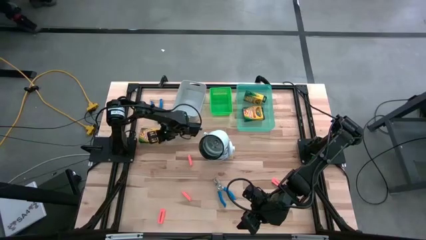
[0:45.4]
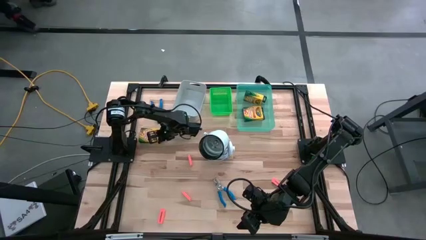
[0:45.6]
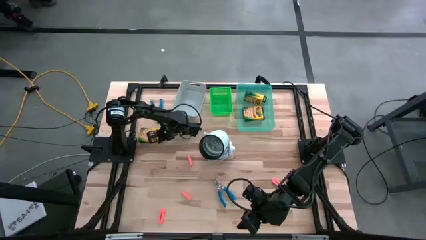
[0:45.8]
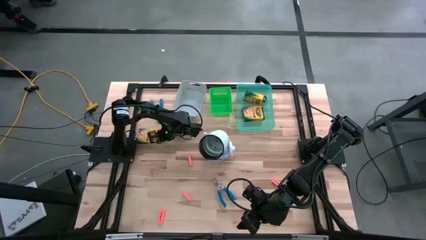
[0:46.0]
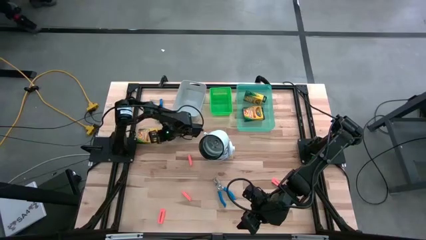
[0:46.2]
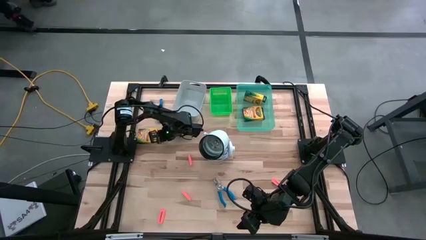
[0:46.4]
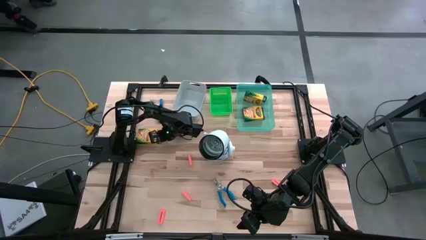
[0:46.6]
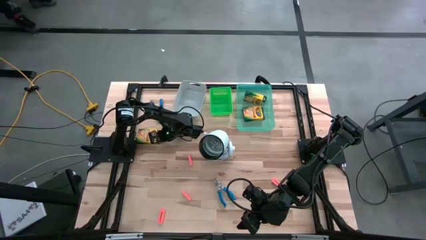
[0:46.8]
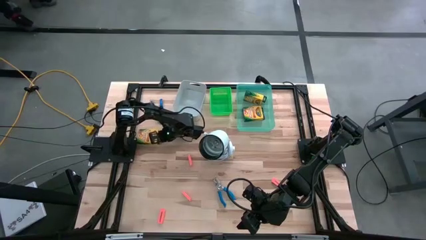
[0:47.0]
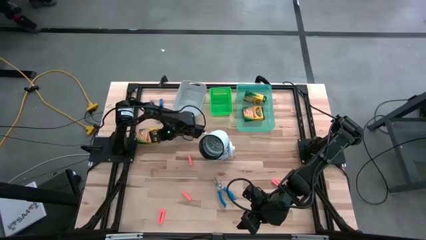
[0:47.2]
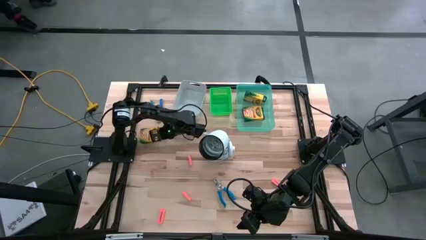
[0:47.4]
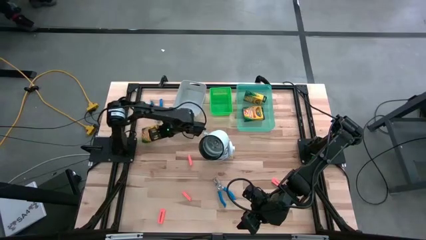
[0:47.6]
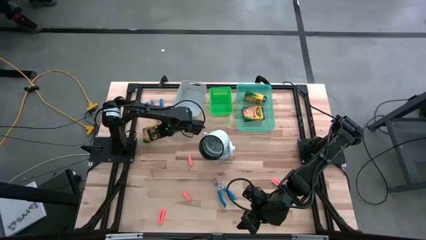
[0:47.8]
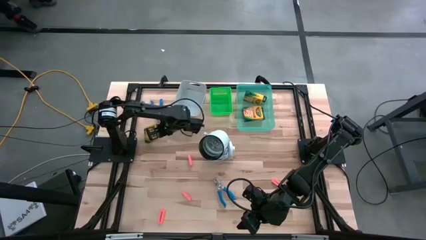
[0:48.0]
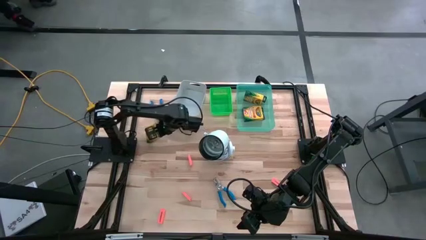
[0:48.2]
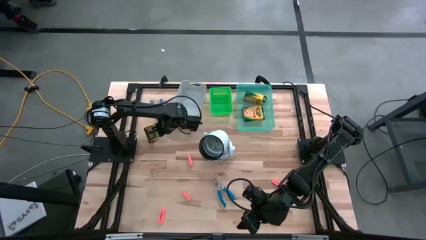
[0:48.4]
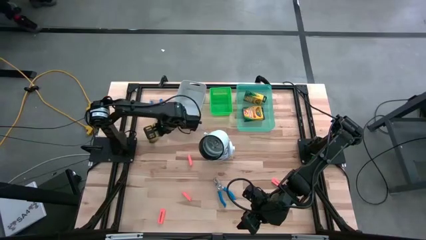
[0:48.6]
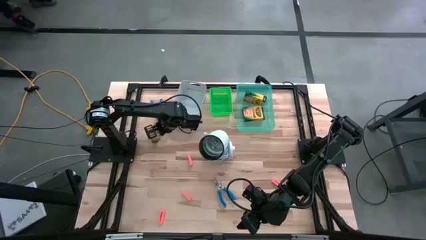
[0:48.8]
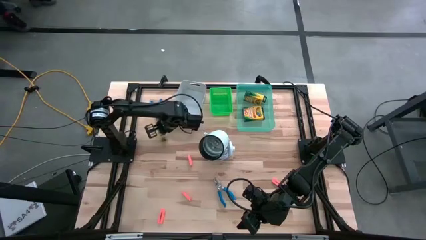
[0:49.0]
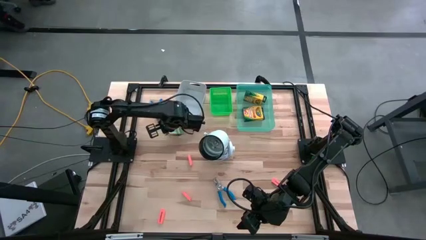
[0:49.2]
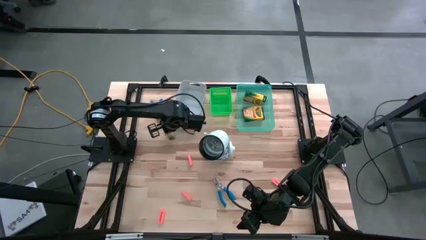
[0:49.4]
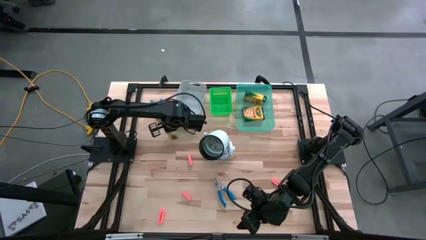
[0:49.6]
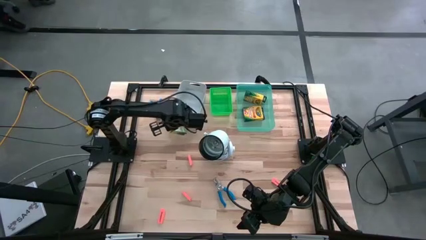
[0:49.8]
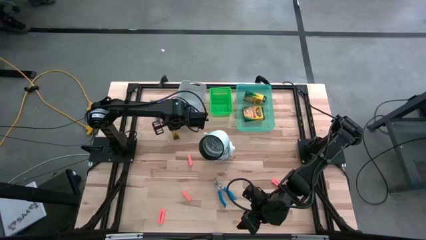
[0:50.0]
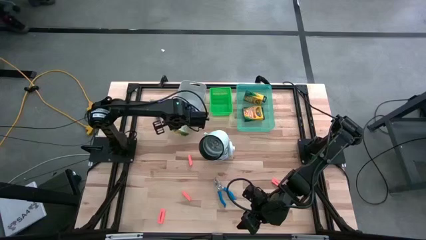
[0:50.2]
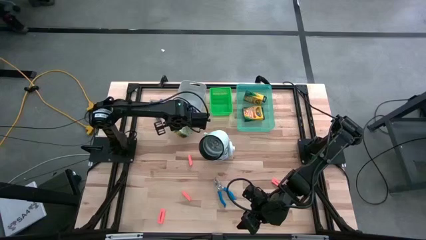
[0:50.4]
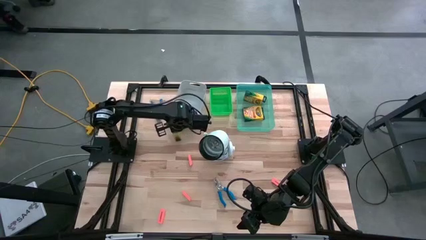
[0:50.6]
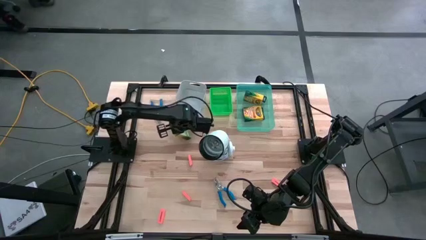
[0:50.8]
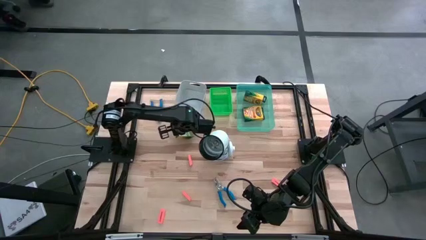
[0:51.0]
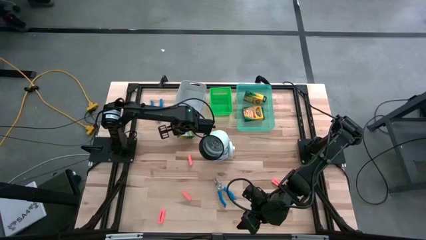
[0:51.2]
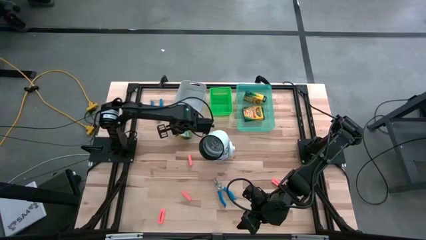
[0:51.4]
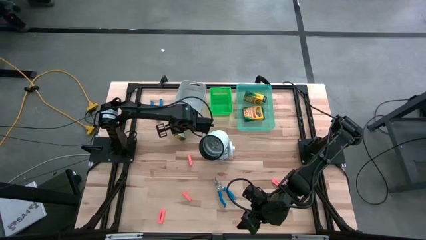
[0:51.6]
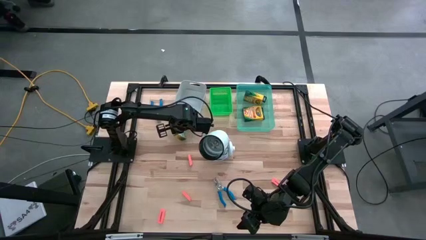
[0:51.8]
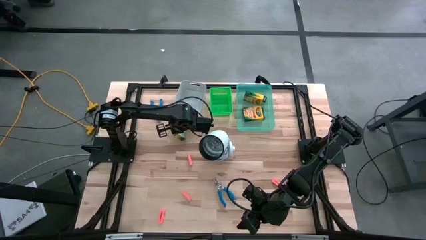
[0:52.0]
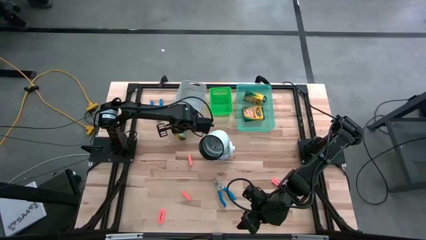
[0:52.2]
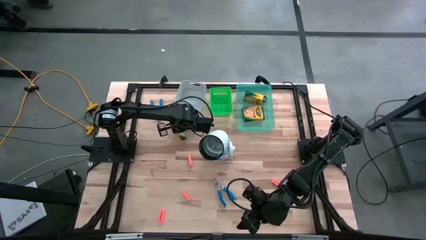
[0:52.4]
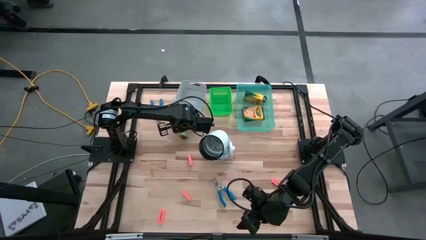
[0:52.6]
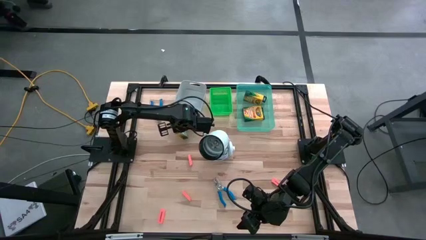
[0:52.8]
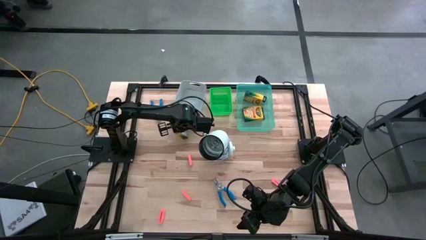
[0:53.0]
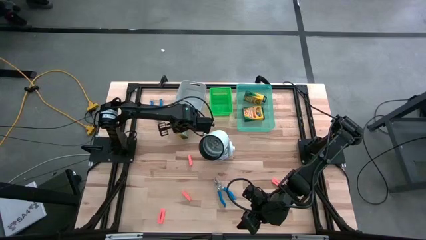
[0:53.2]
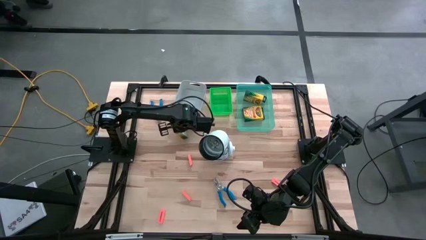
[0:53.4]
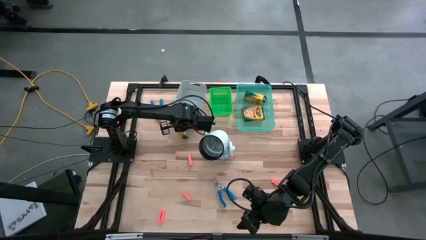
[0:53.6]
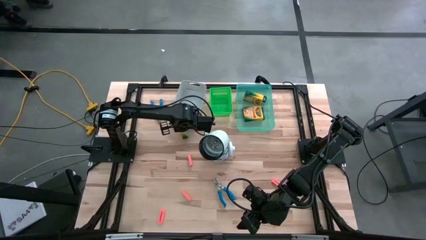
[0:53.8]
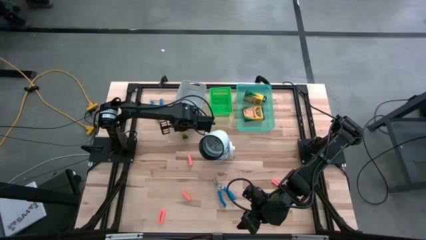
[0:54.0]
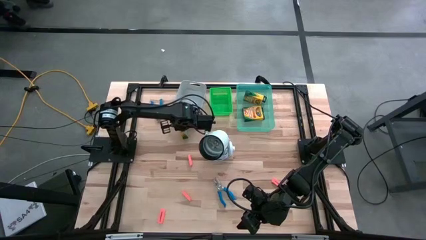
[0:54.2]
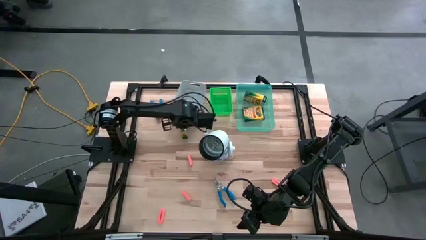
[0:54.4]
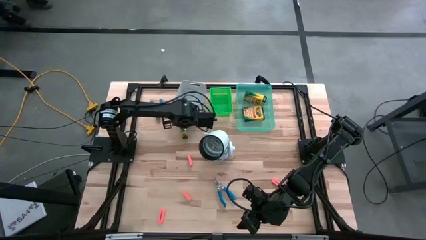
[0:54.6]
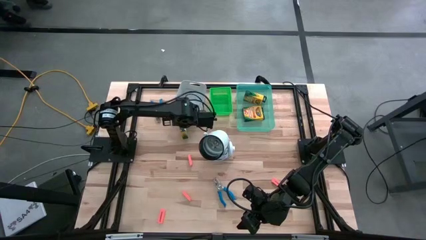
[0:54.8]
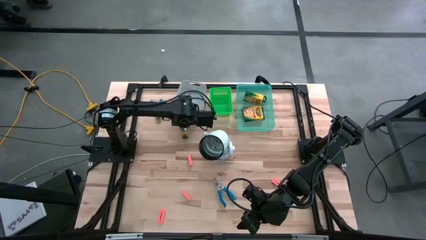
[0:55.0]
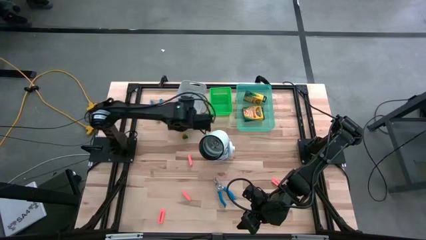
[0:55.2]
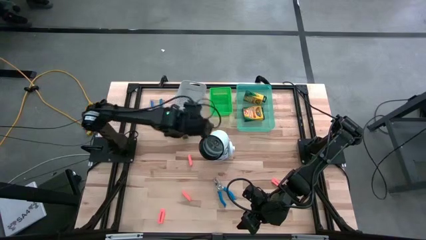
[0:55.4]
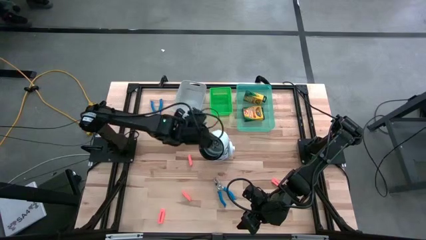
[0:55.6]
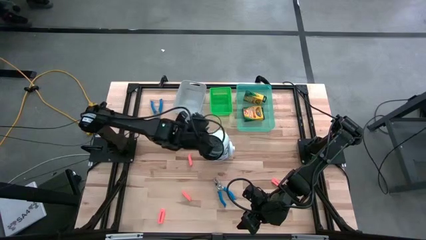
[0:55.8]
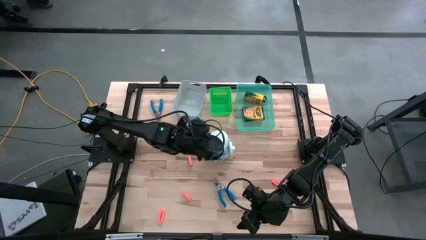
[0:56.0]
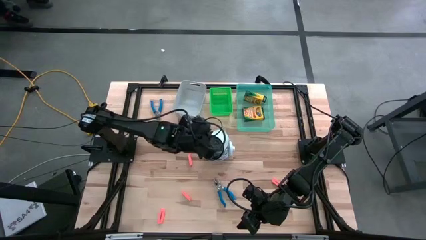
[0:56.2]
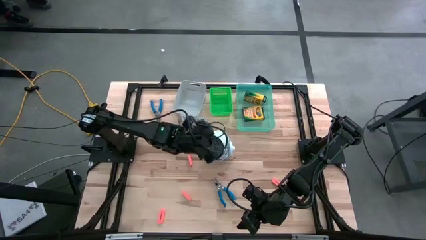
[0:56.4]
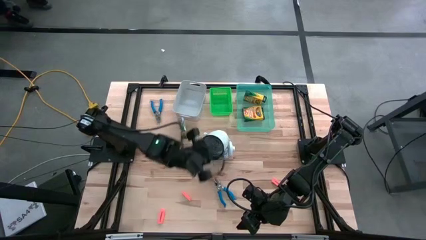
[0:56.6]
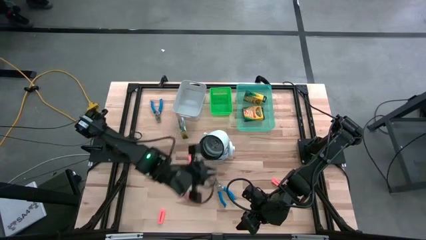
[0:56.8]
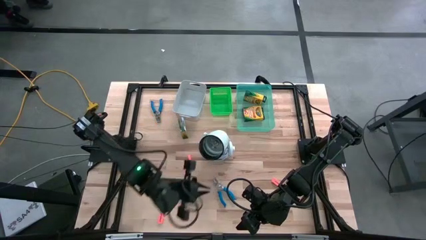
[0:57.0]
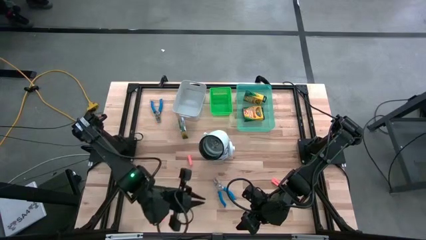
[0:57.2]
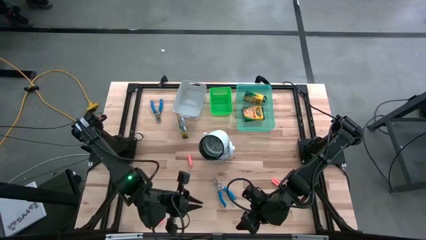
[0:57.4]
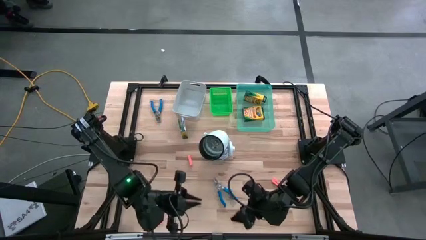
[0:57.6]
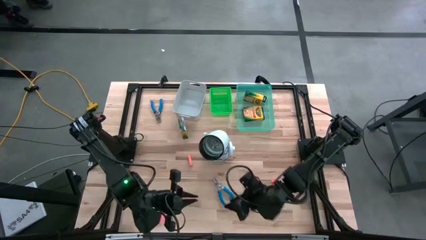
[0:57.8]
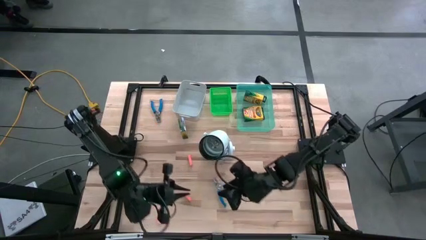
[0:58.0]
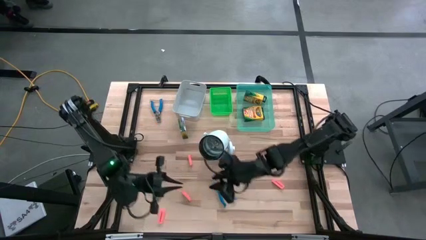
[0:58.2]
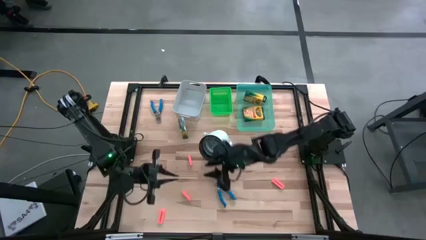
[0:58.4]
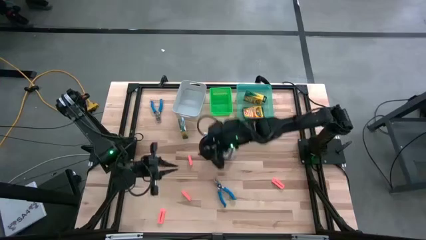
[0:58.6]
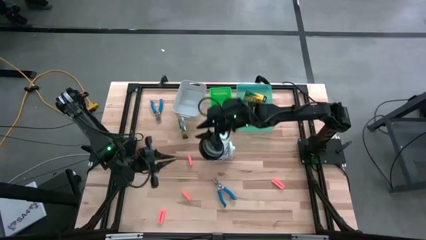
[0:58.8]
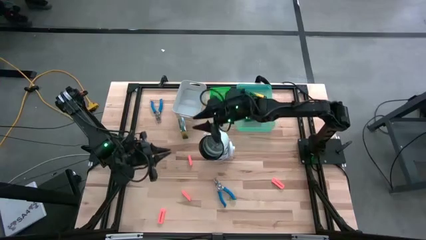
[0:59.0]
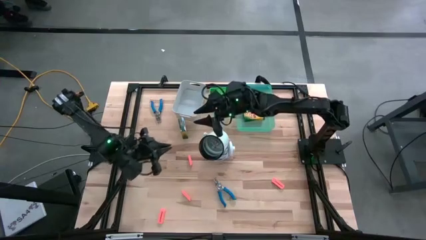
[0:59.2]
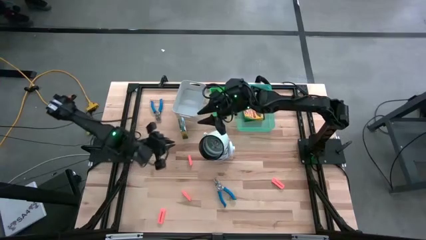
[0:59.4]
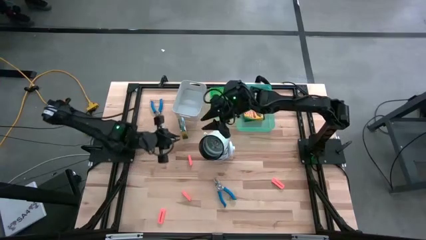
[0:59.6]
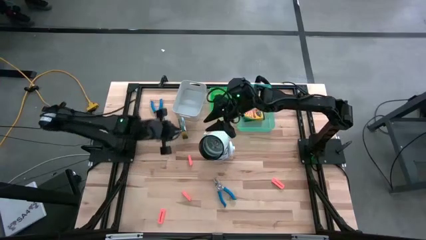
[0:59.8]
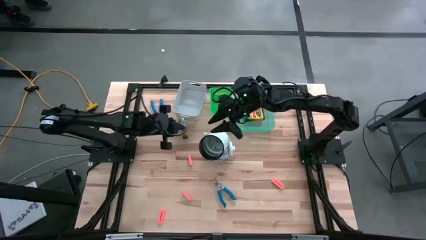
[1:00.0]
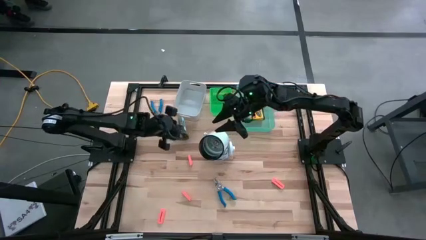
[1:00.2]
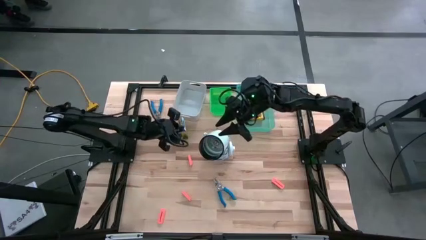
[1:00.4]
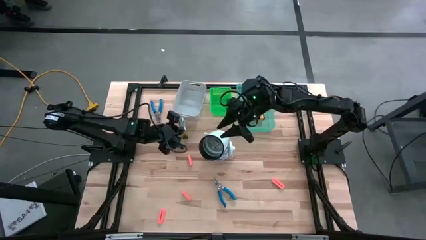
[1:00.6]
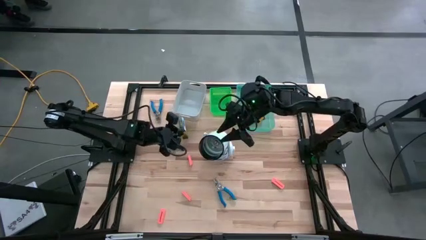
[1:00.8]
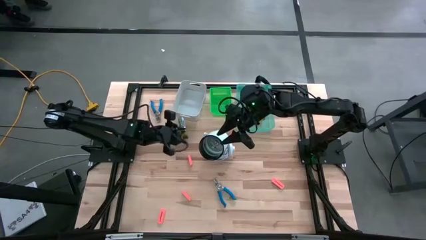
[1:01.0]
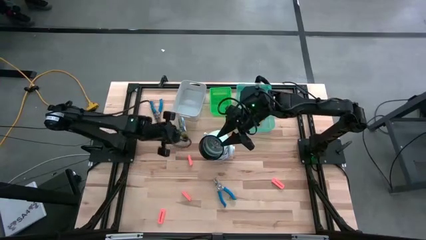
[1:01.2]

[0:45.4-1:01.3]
Task: Pick & Place School Supplies
Put the yellow crayon box into the blue bin
